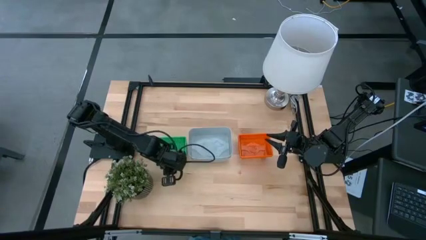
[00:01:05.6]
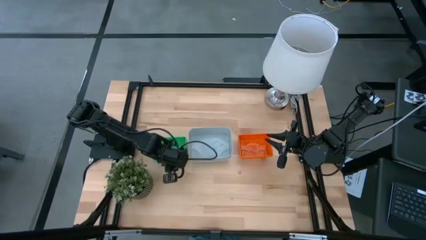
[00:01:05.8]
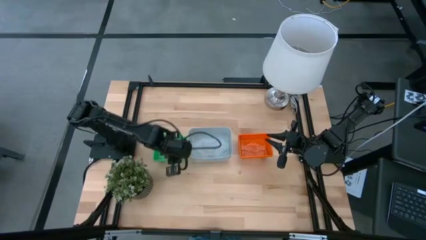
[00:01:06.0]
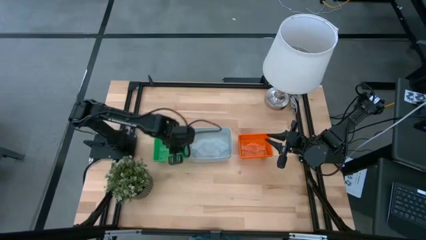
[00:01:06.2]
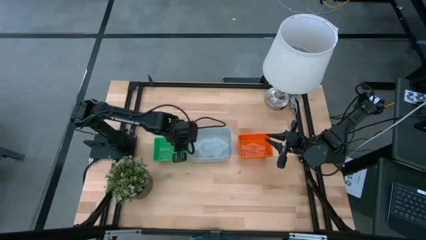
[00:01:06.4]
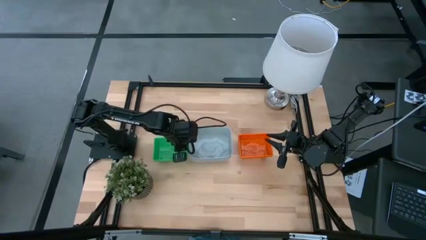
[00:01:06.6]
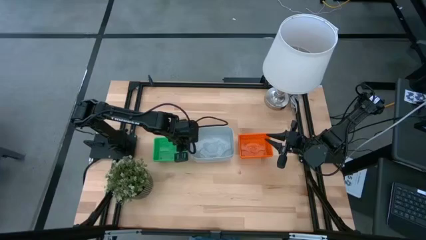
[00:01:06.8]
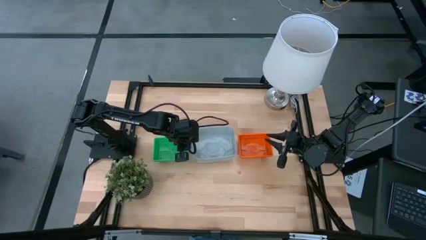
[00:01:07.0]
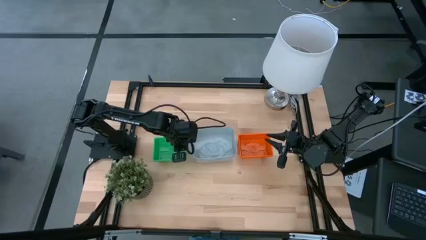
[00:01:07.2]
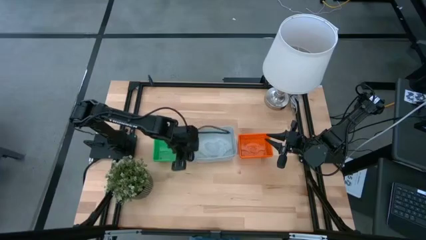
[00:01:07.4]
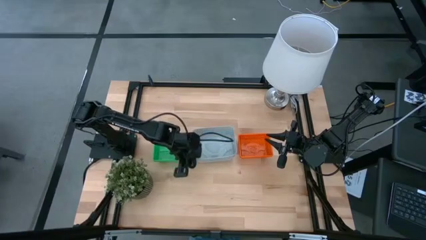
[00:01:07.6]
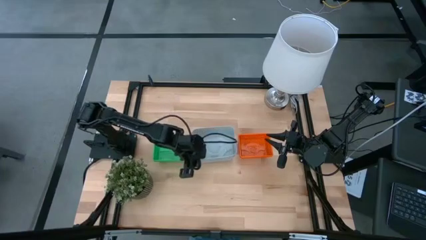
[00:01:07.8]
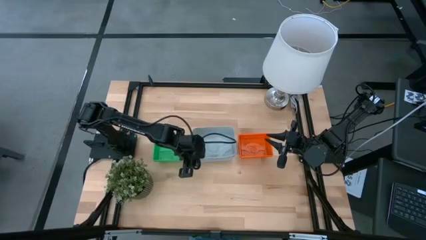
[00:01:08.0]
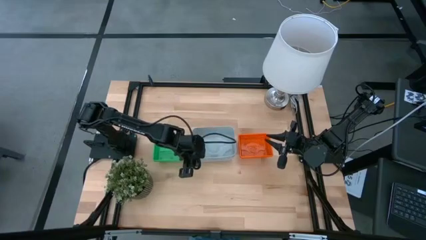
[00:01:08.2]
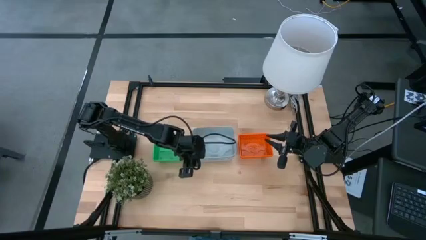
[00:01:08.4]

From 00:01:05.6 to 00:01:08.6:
Adjust the gray bins

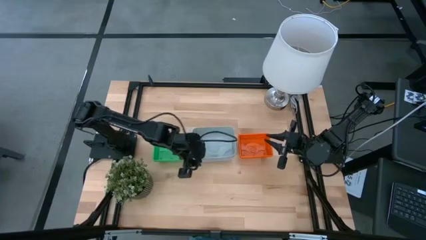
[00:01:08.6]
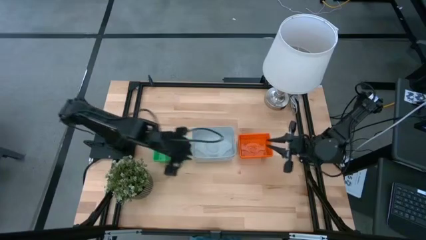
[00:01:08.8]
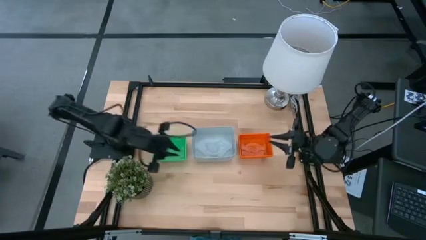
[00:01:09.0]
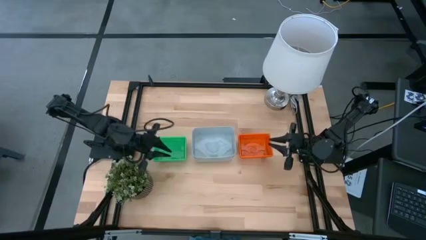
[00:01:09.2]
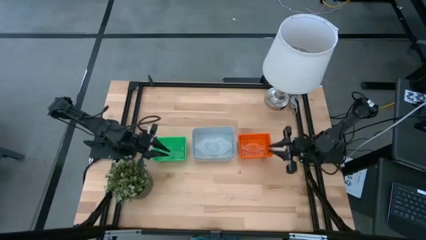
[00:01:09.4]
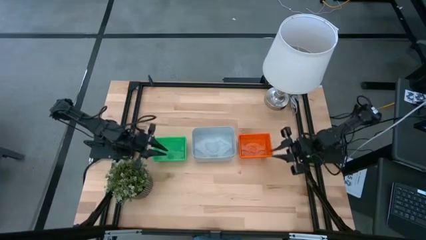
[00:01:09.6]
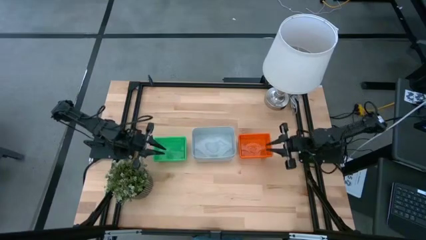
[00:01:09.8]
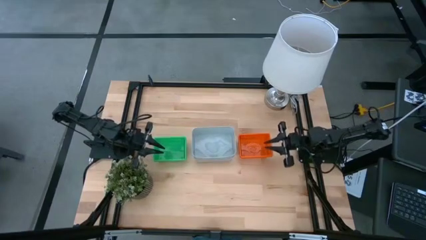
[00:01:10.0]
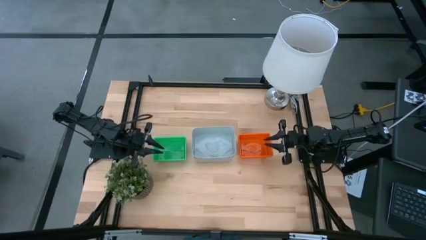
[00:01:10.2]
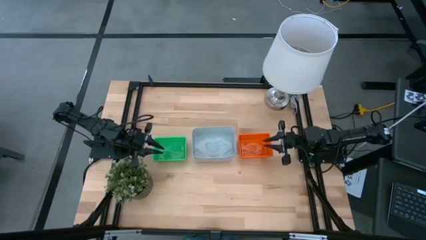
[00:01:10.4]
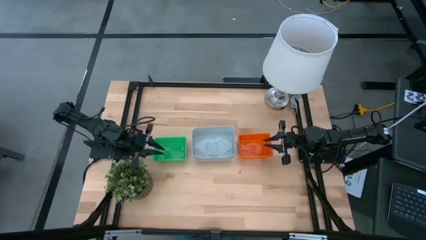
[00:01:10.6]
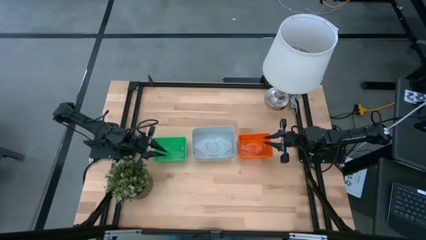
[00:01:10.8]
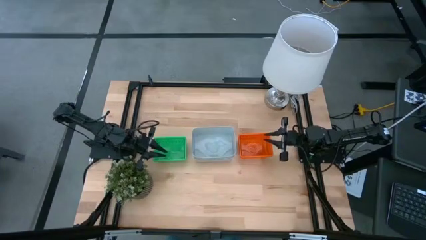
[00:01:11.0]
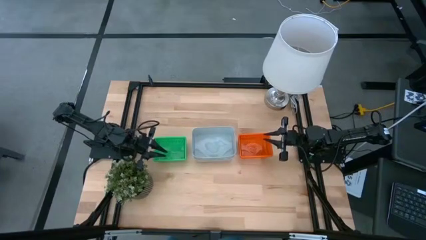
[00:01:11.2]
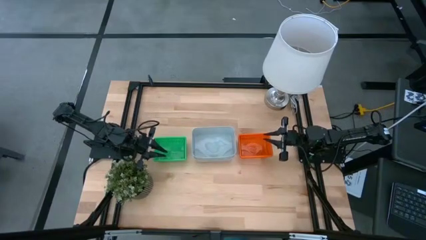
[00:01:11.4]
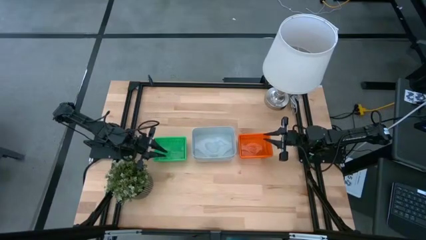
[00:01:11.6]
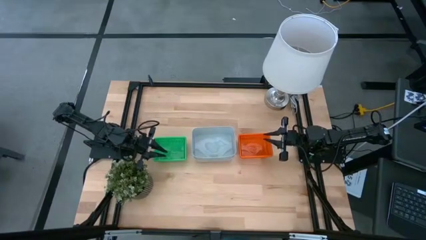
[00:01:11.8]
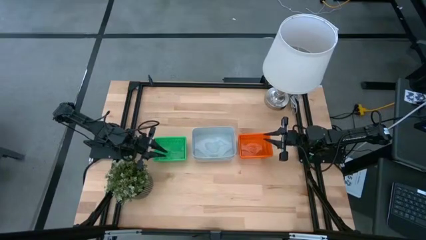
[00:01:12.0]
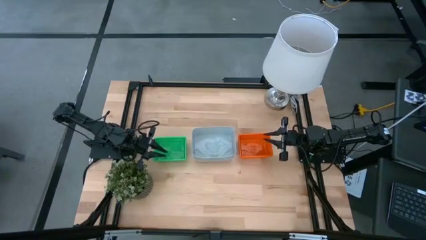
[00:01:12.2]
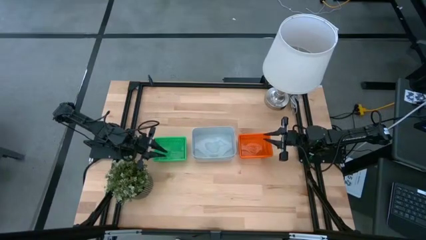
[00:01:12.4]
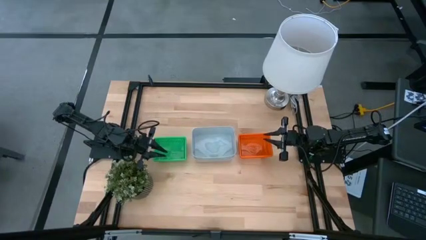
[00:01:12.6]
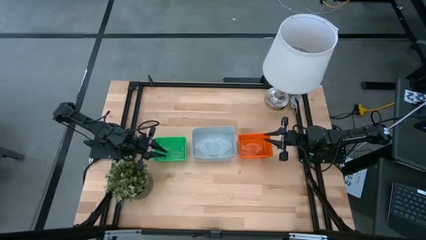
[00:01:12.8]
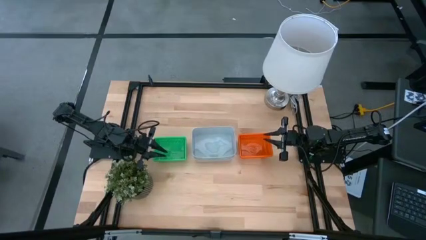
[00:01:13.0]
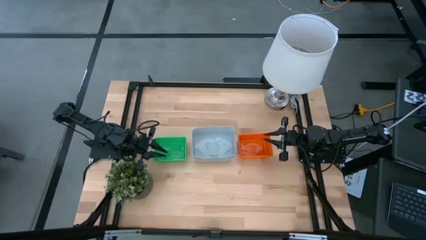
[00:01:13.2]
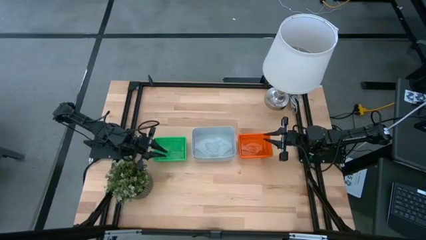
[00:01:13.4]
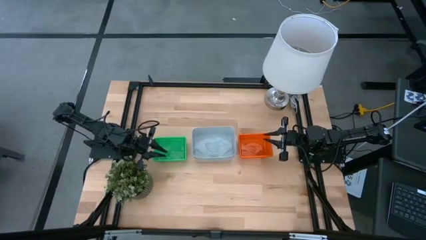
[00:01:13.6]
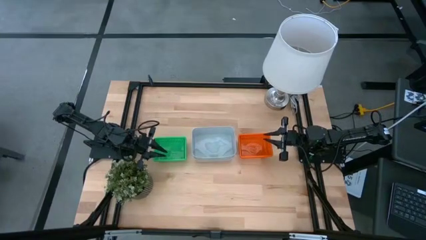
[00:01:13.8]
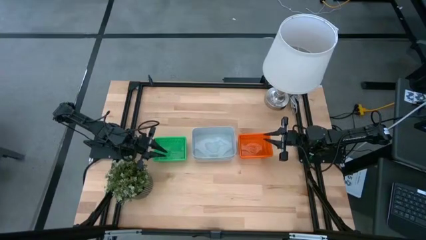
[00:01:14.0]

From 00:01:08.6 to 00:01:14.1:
Return to Home Position

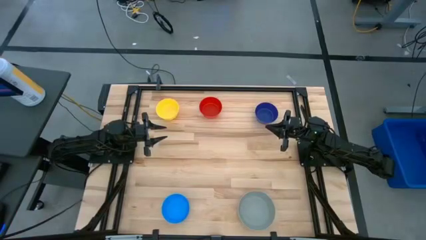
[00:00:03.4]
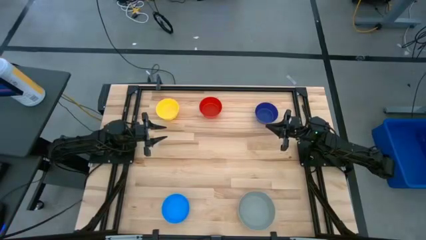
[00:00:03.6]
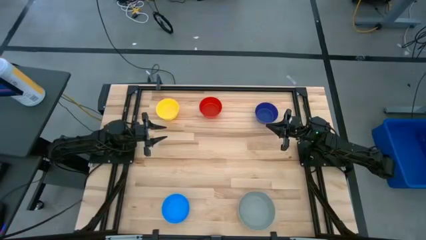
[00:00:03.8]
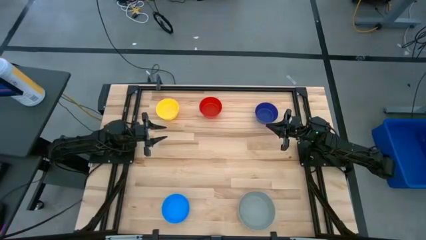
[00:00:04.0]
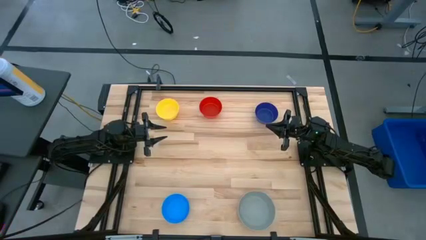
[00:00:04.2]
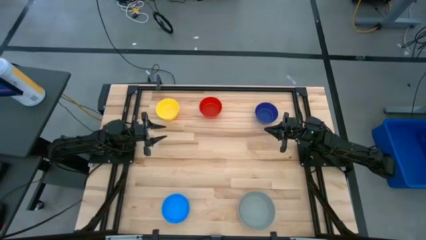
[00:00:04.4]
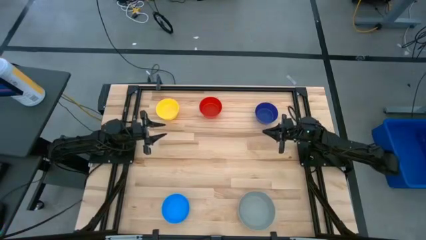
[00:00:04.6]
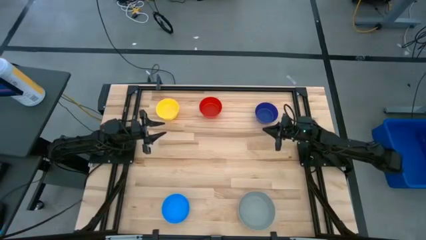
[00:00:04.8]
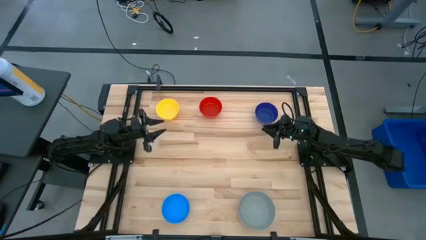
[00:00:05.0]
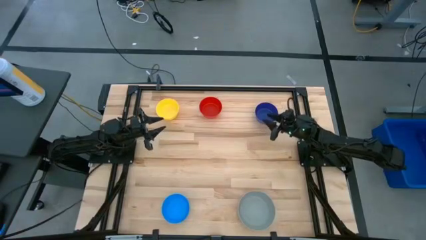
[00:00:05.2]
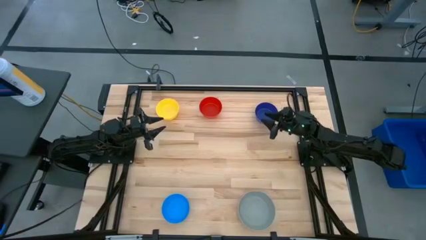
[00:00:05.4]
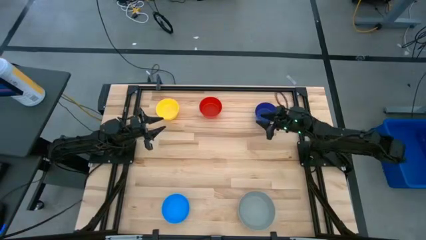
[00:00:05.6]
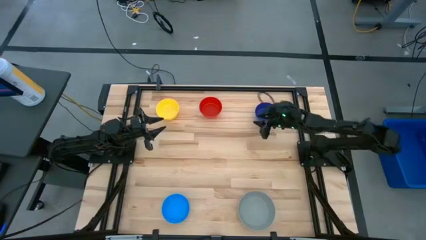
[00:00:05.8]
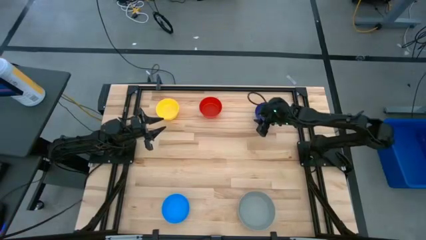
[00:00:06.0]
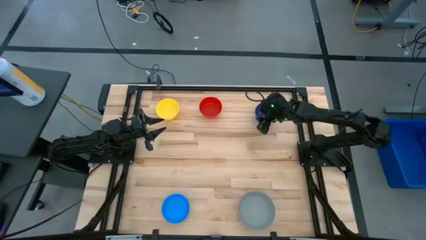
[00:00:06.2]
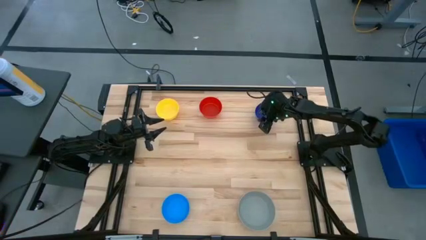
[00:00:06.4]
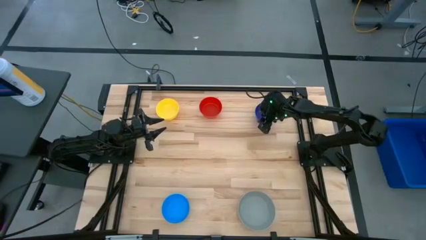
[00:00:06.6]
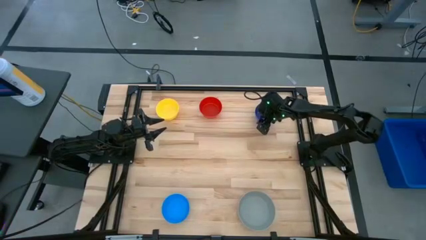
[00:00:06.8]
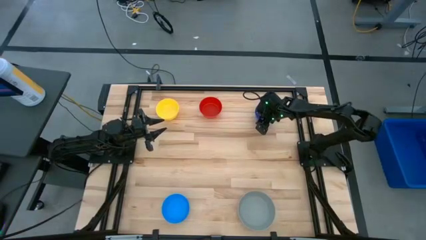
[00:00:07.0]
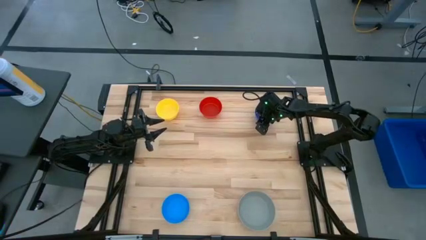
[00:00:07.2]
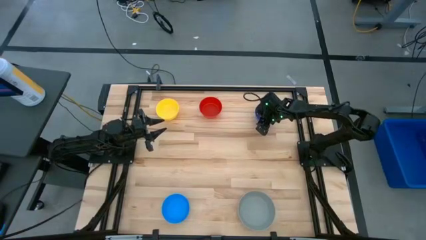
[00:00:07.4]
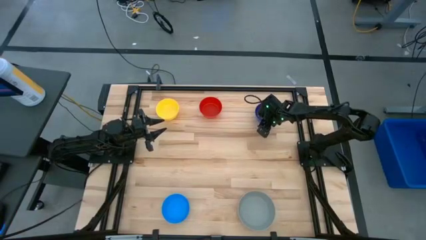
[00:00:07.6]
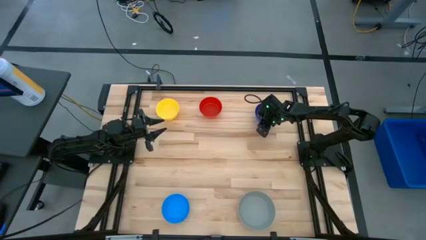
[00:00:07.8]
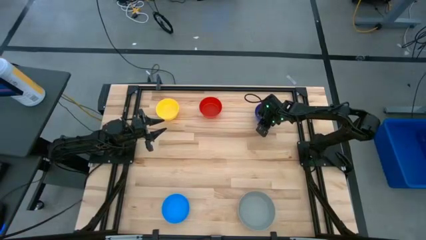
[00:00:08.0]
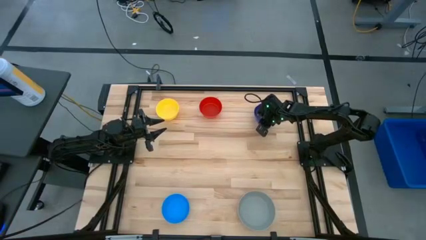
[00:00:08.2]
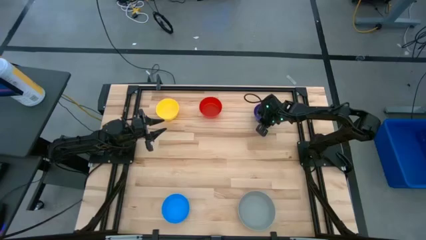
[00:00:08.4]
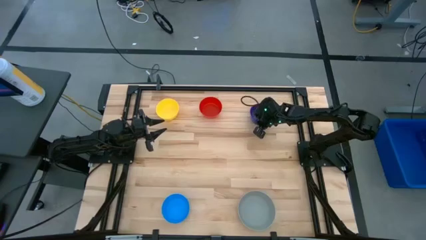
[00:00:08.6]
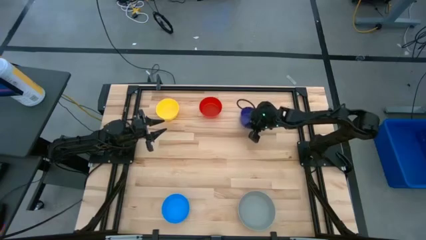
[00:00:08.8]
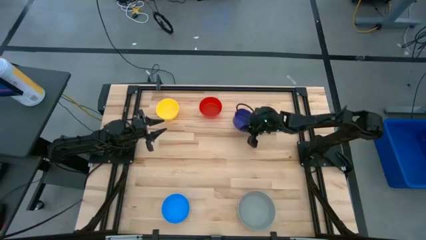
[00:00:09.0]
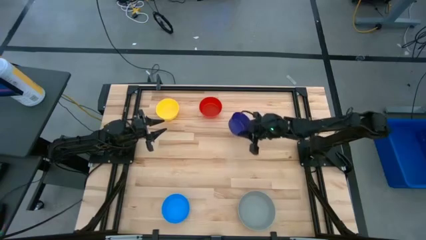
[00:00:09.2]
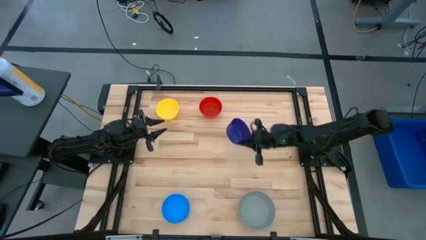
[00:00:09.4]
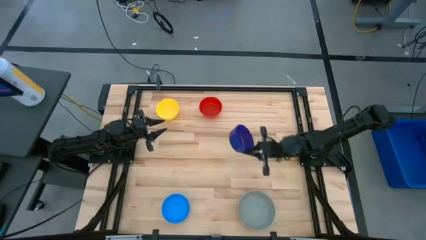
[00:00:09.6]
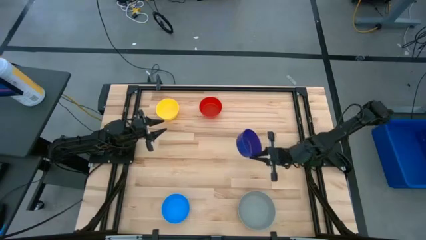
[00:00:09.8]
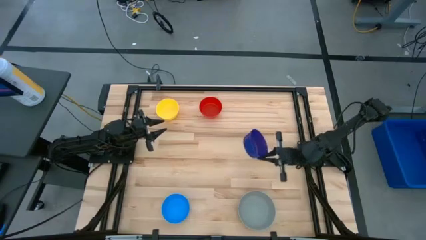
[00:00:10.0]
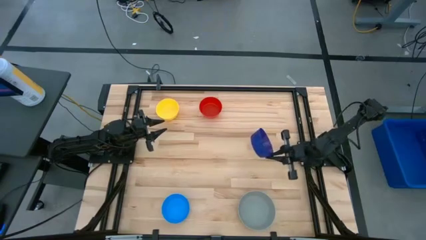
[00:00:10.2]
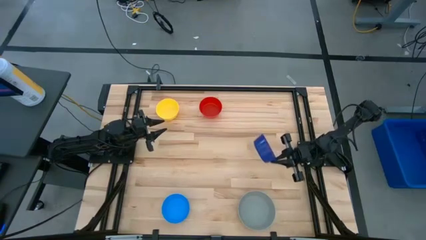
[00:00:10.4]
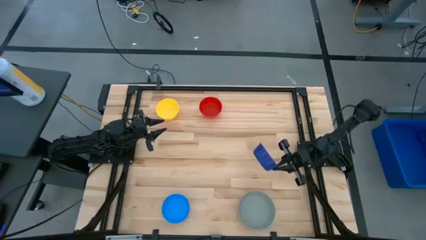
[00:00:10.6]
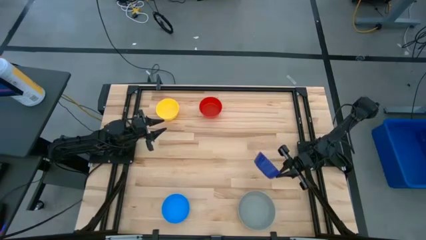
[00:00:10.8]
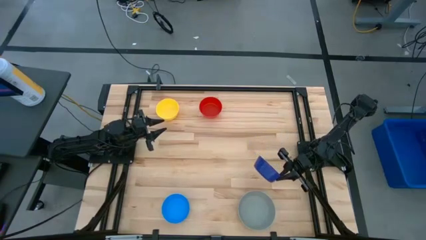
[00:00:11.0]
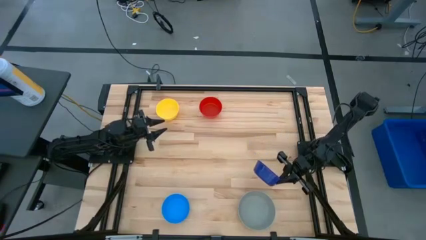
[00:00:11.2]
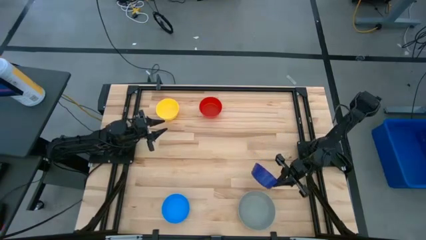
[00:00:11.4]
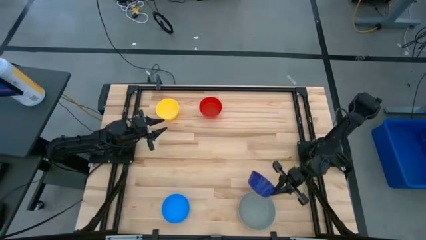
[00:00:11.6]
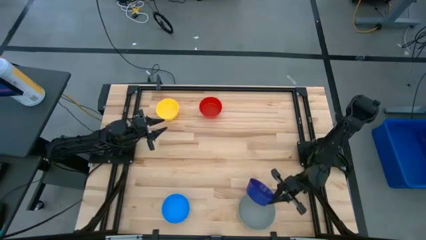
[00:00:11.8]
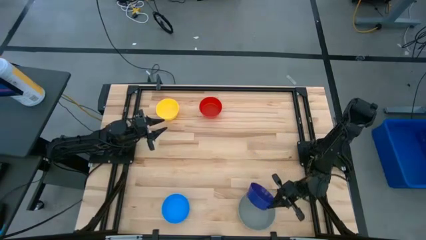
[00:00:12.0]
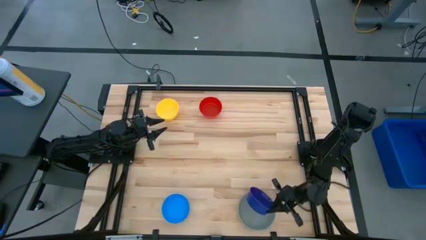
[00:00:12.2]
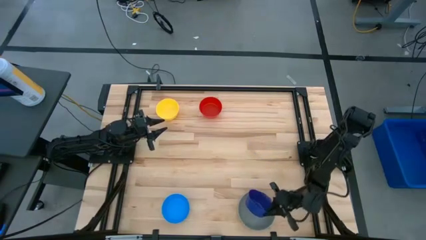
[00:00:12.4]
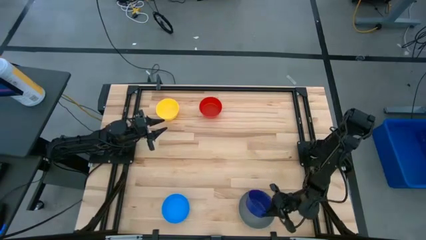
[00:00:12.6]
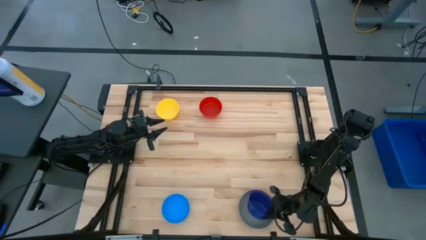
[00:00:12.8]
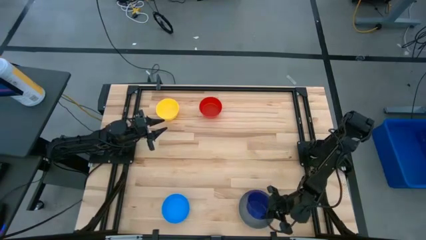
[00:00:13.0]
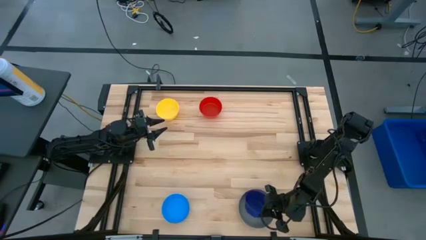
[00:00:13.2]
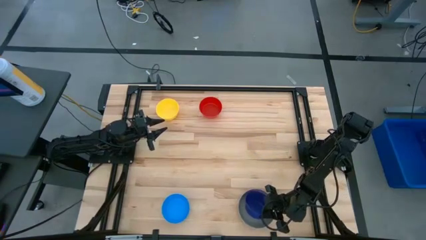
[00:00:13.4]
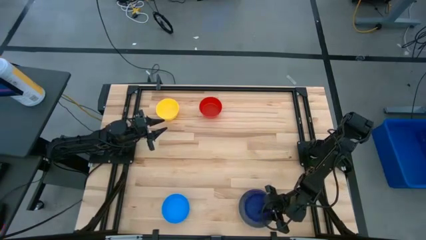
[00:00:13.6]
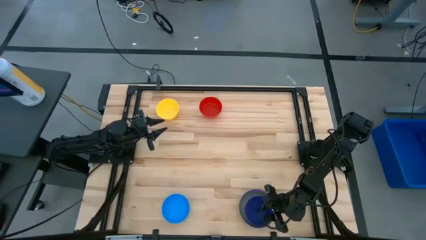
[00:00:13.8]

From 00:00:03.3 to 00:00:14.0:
Stack the blue bowl on the gray bowl
